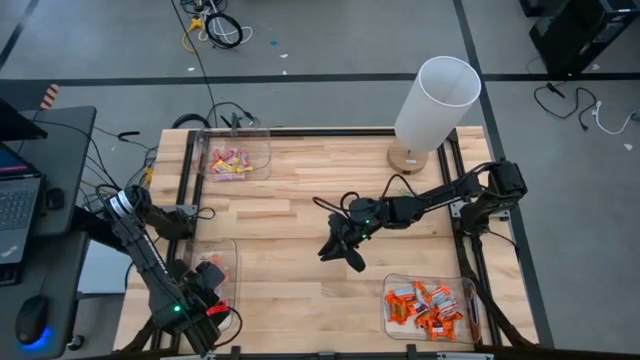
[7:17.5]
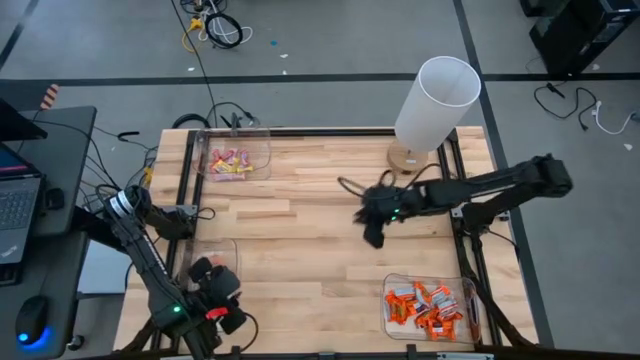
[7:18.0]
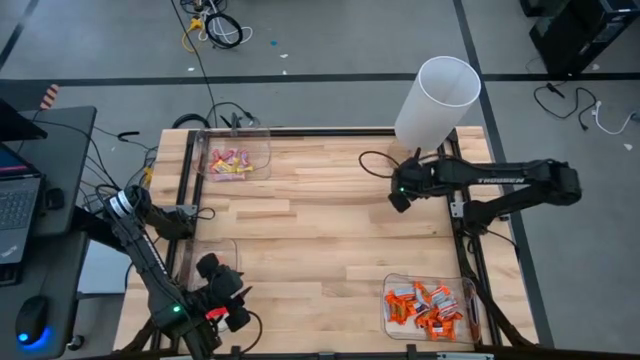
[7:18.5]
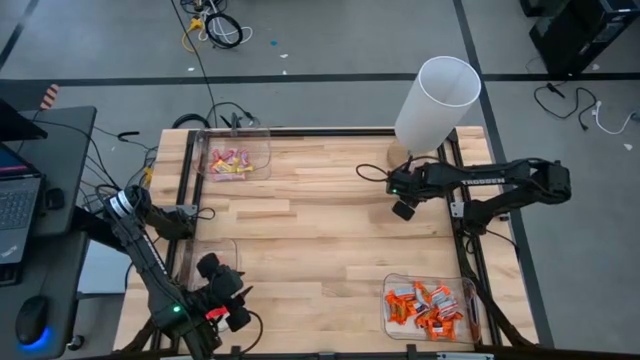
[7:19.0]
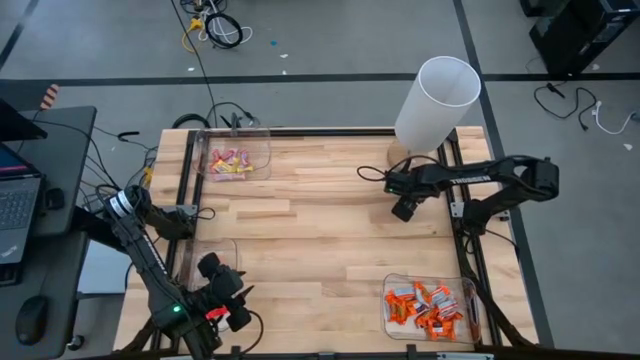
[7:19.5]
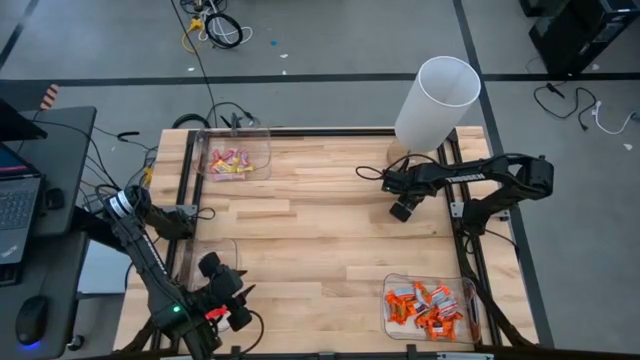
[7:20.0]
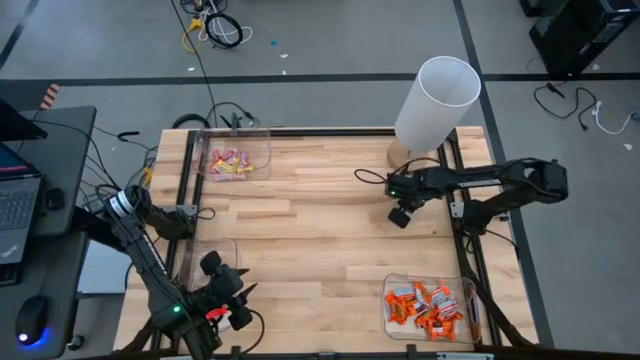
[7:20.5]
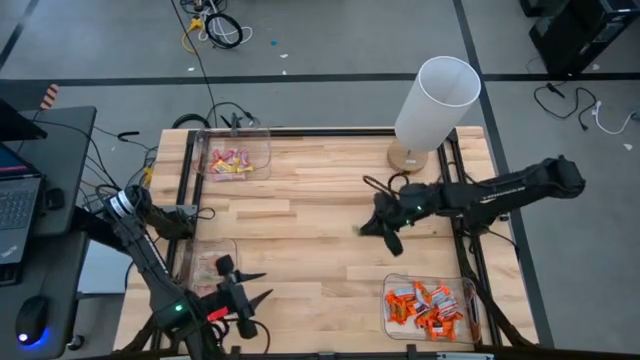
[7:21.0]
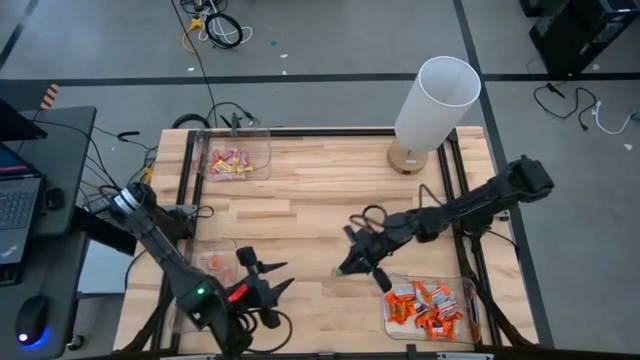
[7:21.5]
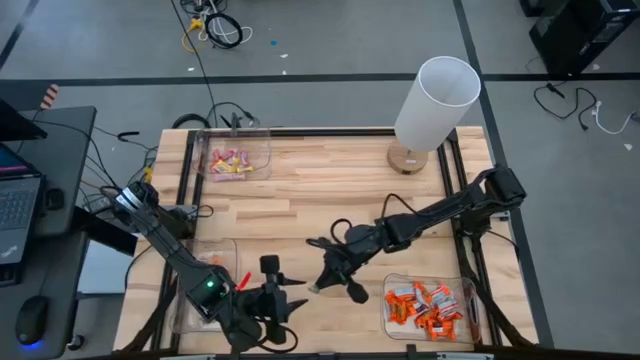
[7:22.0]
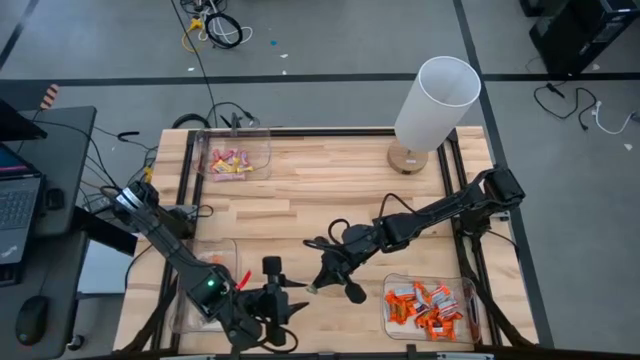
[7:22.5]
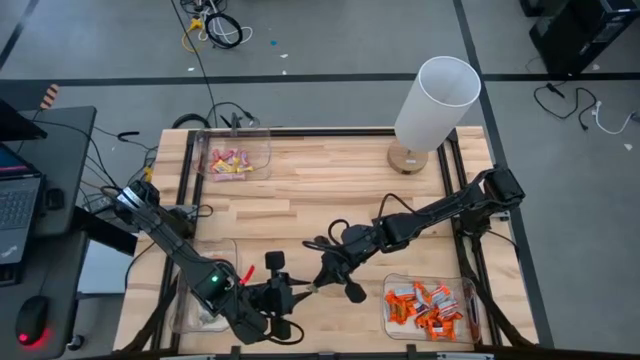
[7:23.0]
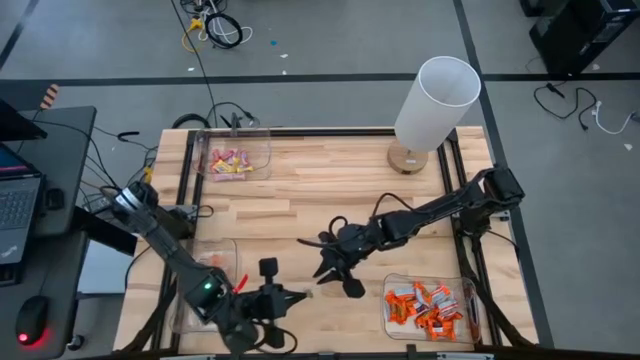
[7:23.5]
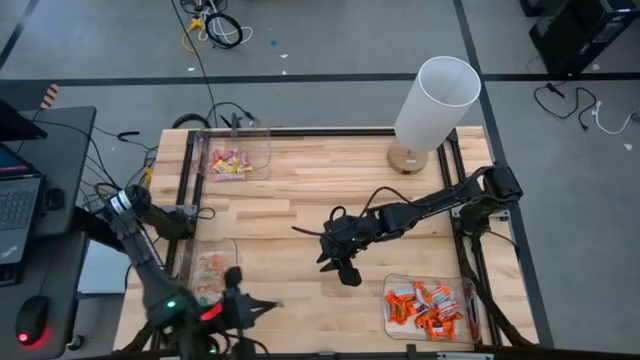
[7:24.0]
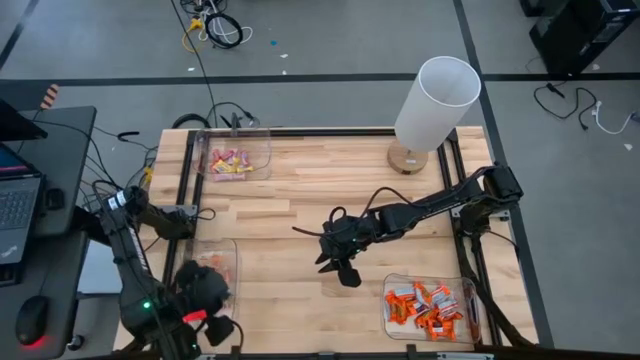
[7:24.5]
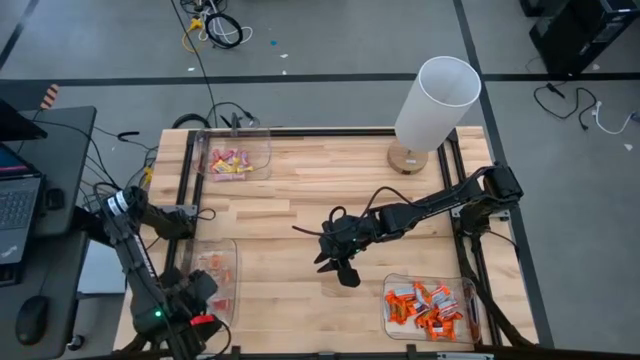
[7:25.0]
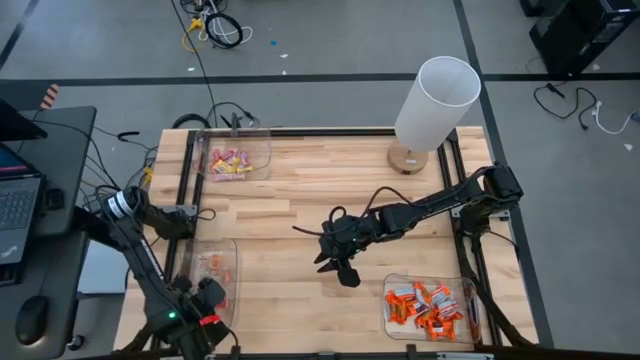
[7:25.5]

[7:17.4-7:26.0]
Task: Sort candy
Put the green gummy into the bottom left transparent bin

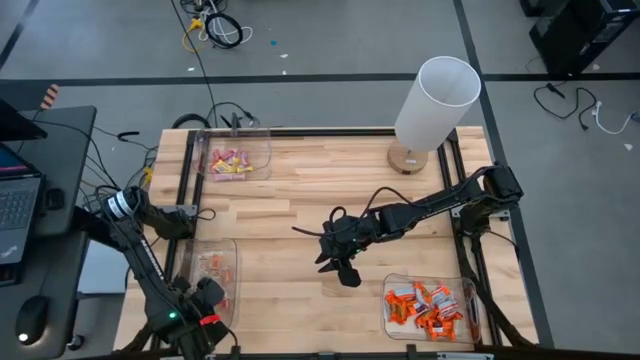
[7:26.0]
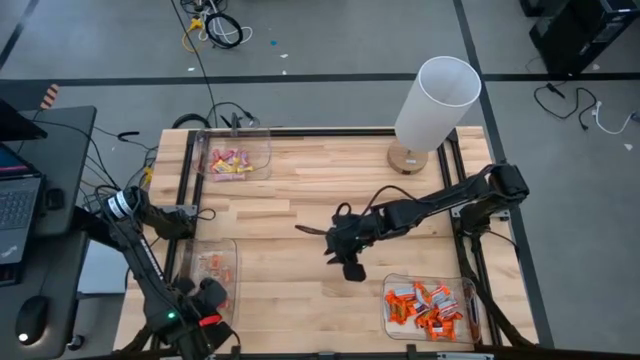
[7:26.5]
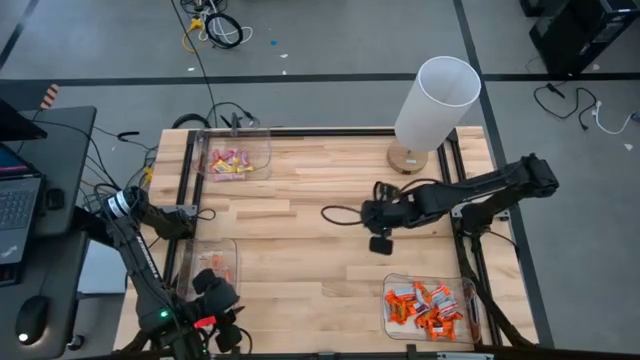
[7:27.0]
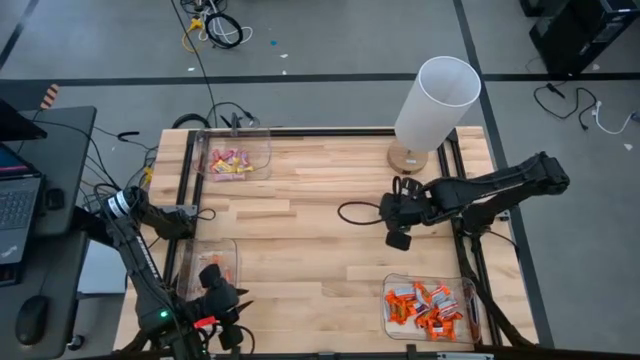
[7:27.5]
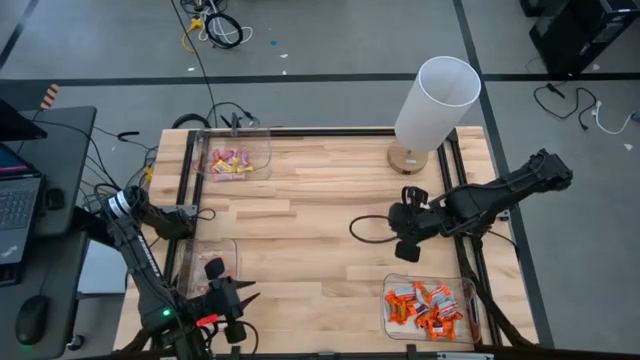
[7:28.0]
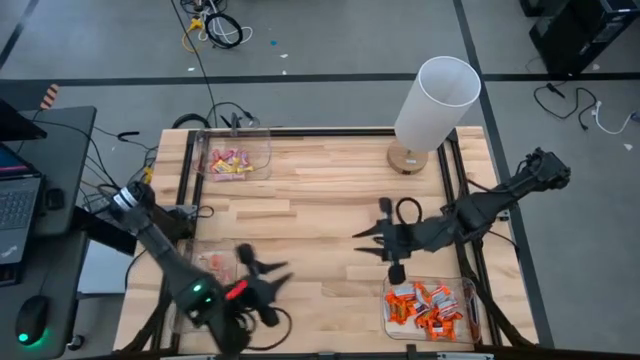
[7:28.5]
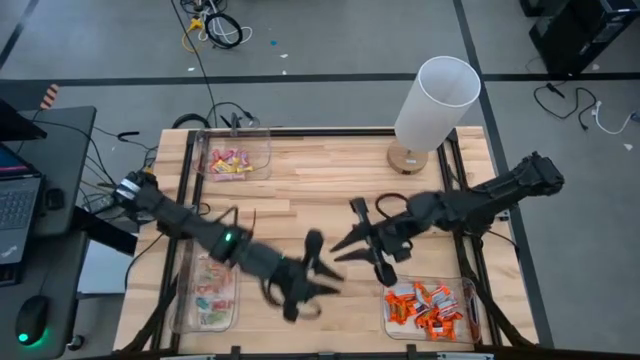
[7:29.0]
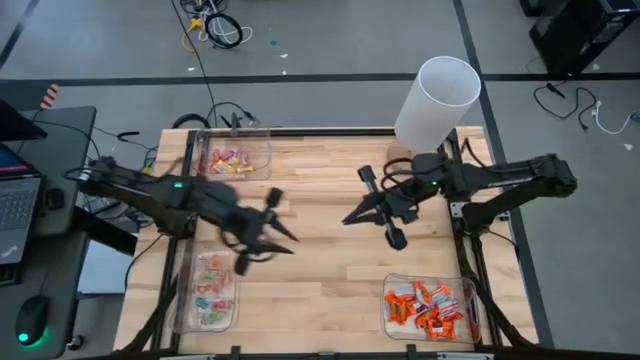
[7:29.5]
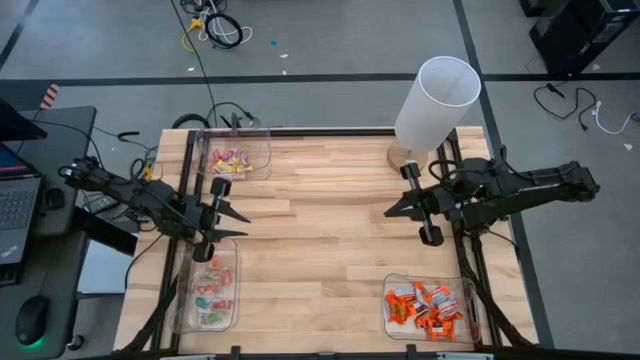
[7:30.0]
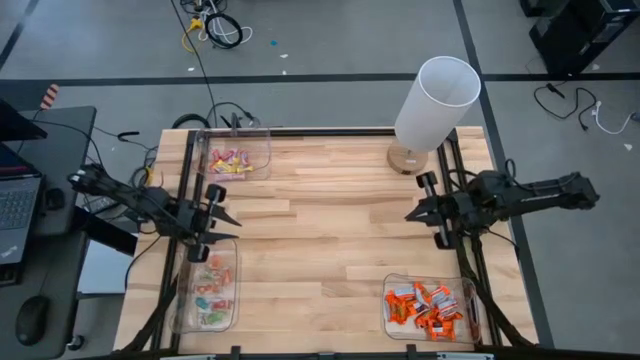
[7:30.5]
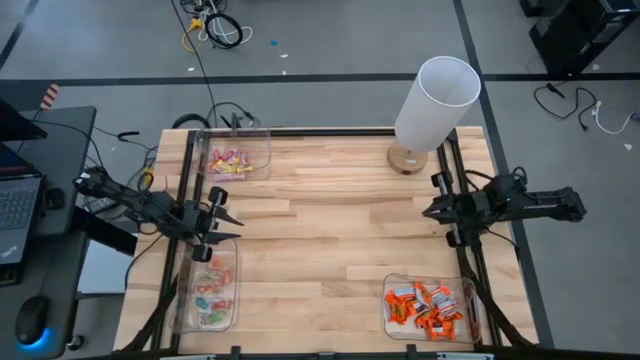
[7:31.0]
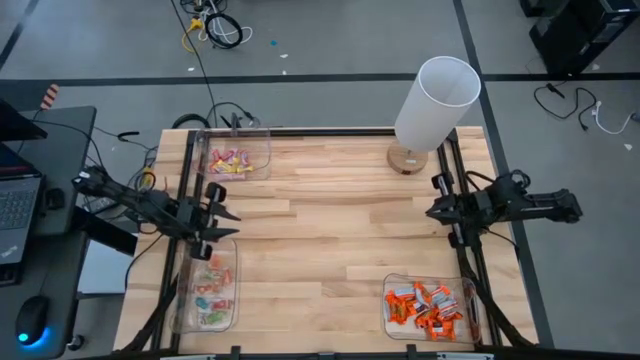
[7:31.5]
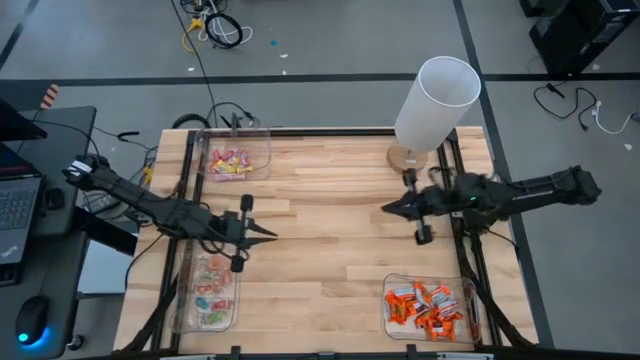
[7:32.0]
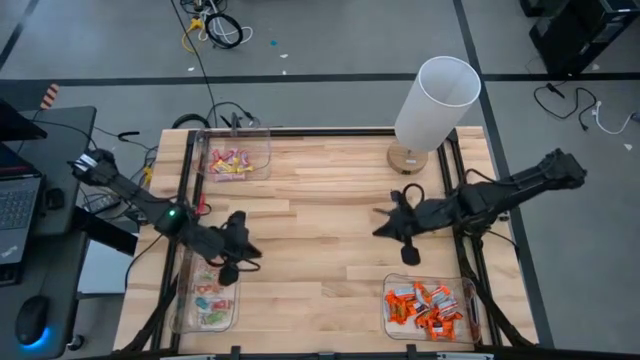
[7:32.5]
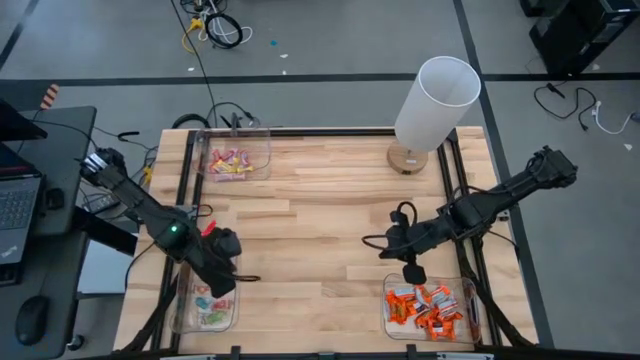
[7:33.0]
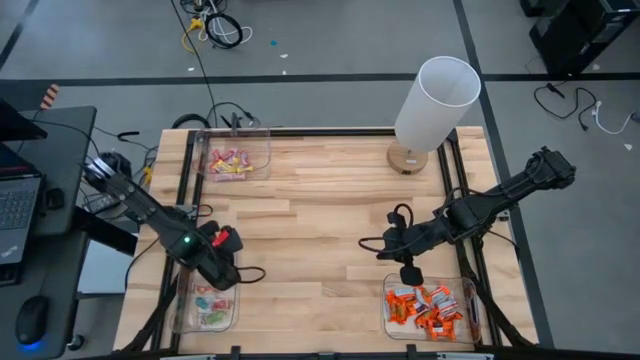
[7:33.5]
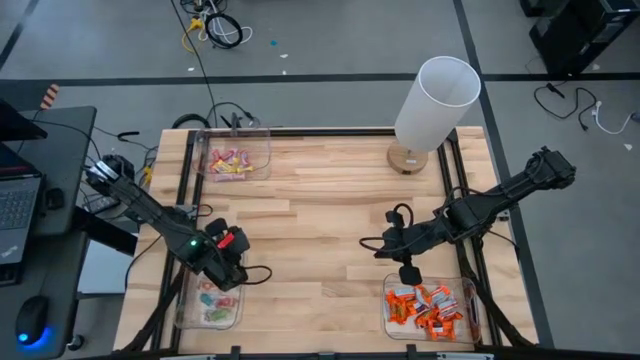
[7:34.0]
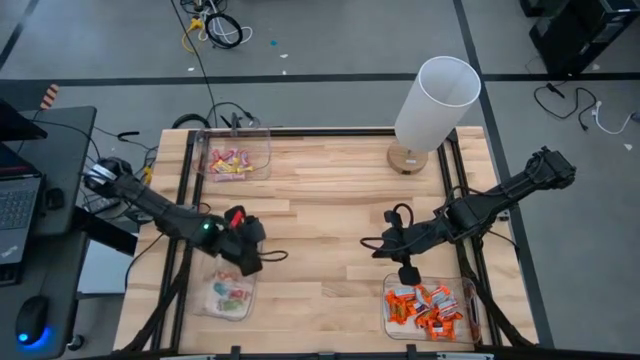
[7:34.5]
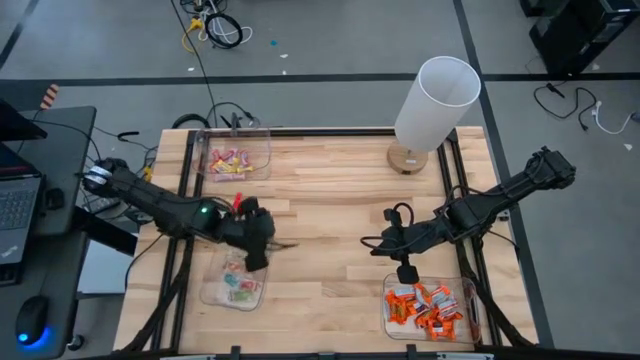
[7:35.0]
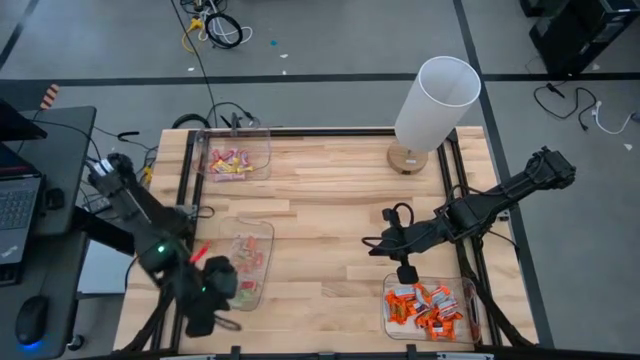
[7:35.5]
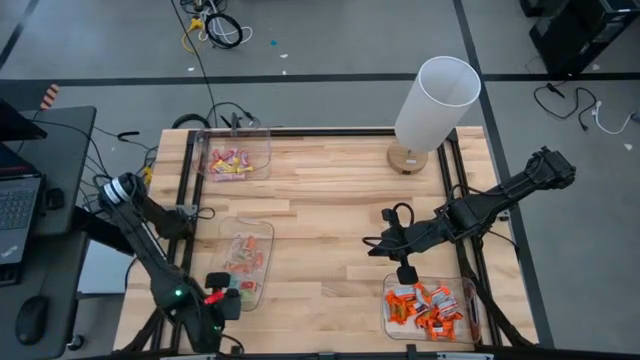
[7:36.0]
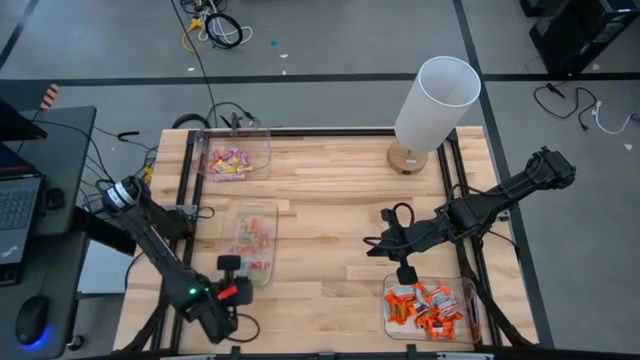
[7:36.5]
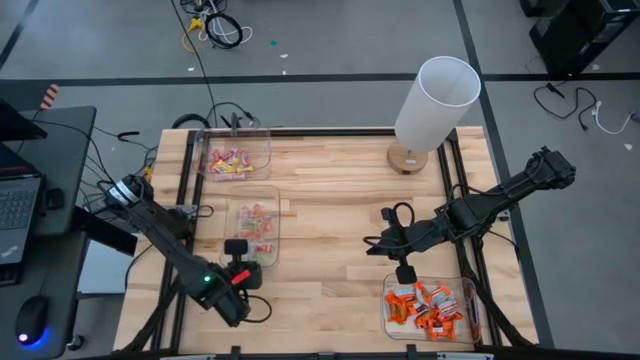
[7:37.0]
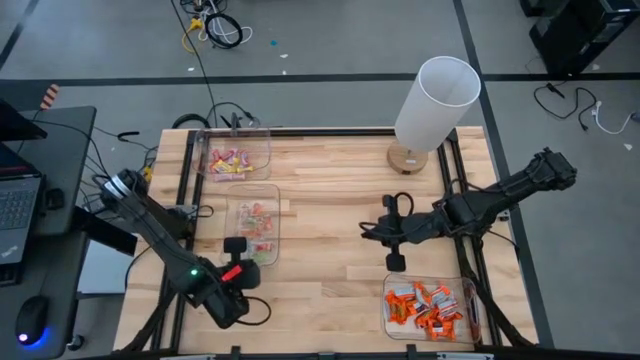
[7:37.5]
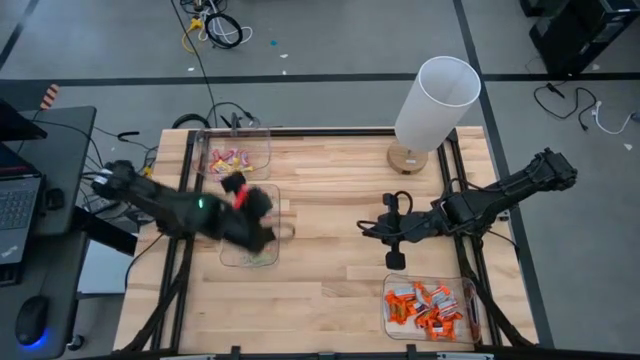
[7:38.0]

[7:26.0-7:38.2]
Move the bottom left transparent bin to the middle left of the table
